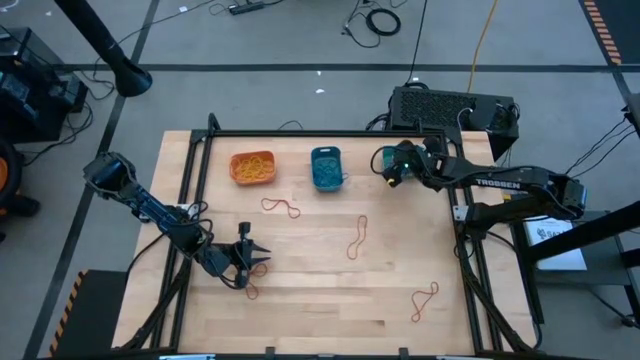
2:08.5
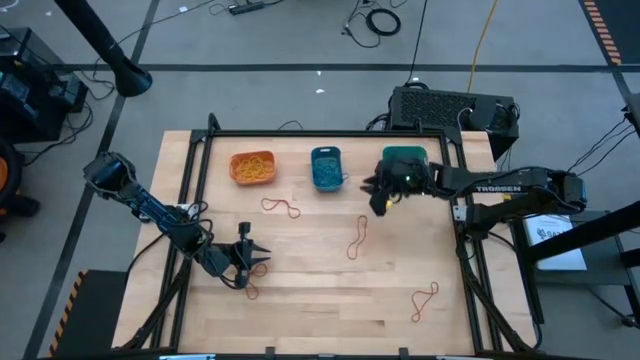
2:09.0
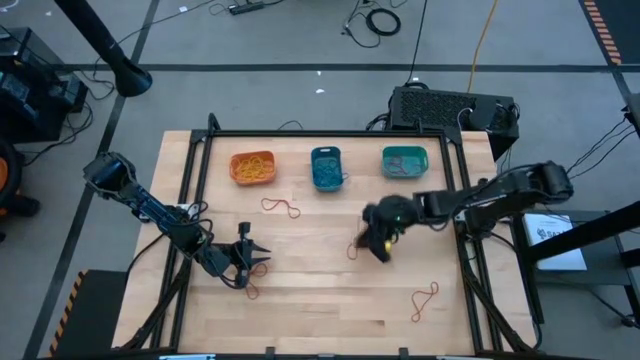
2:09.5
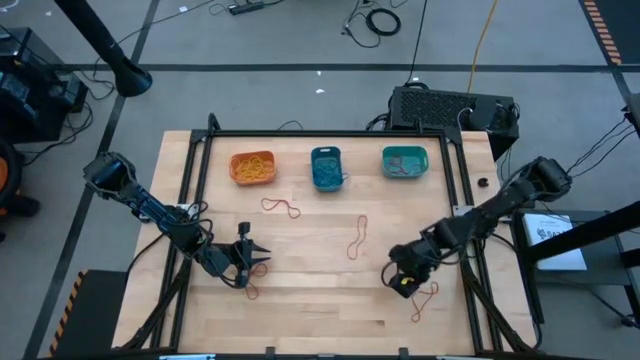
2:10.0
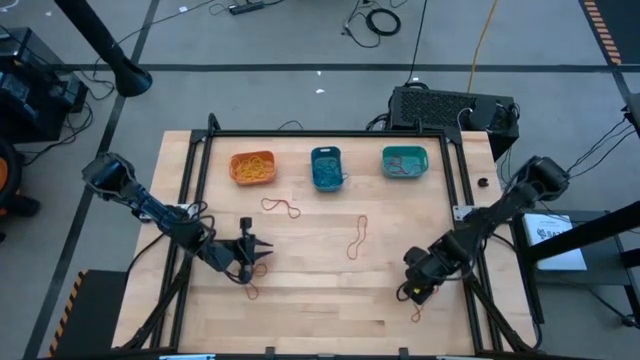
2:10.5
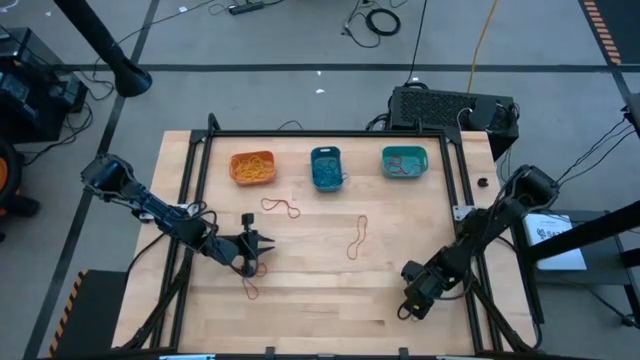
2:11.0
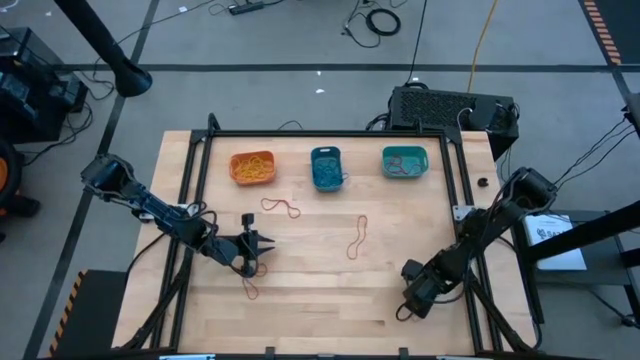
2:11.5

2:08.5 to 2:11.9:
Task: Sort rubber bands into baskets
Put the red rubber band into the green bin

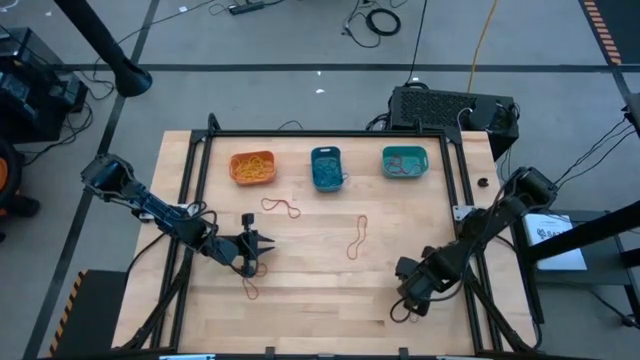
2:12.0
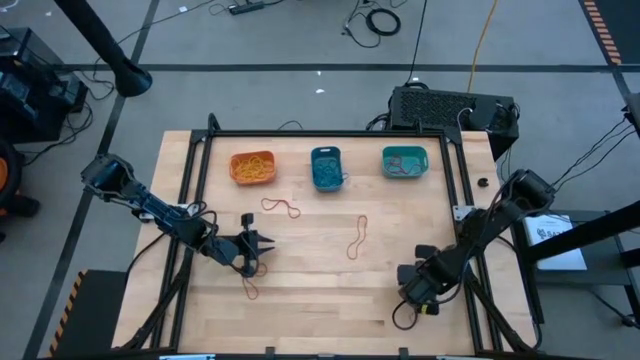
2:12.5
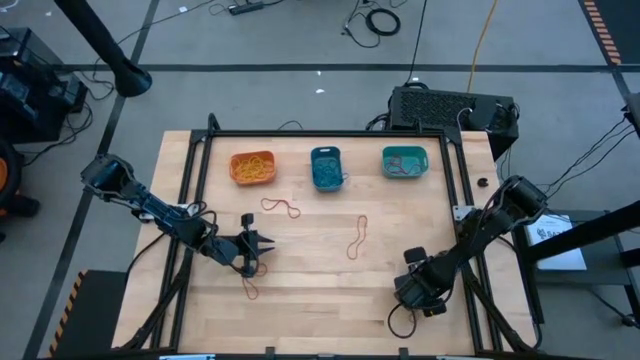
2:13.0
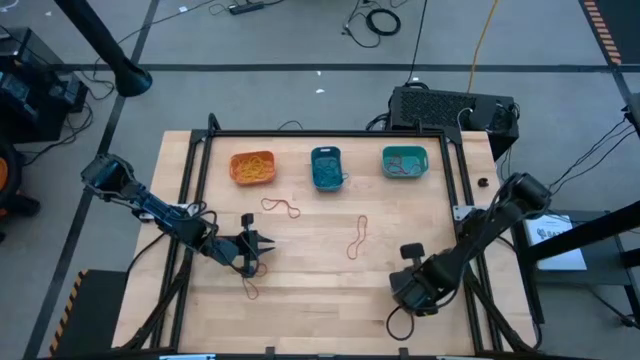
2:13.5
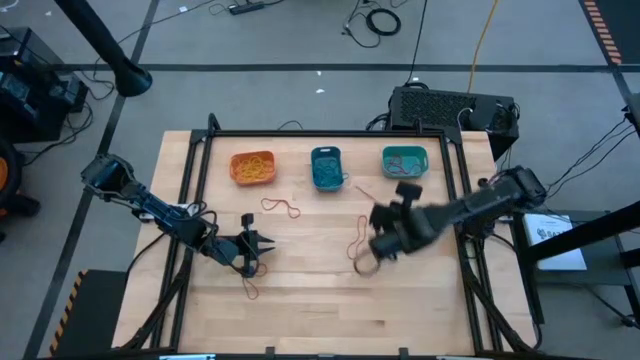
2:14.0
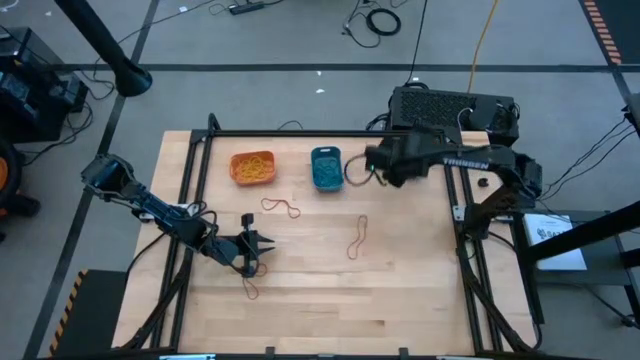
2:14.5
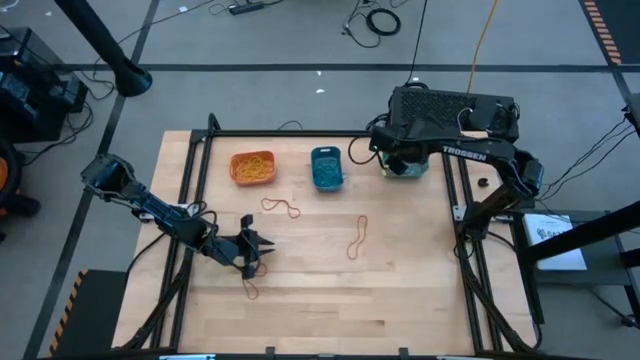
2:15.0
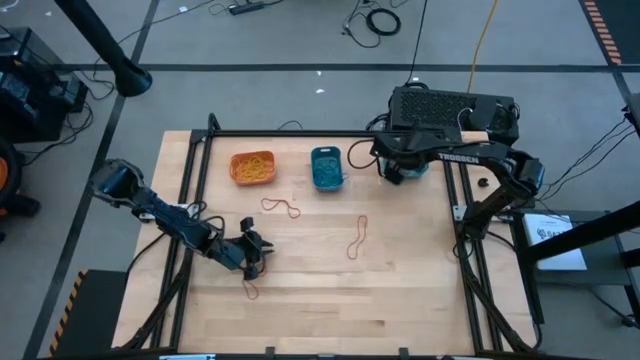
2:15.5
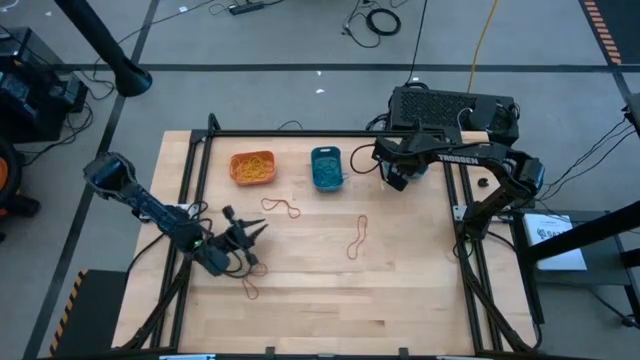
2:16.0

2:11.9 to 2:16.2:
Put the red rubber band into the green bin

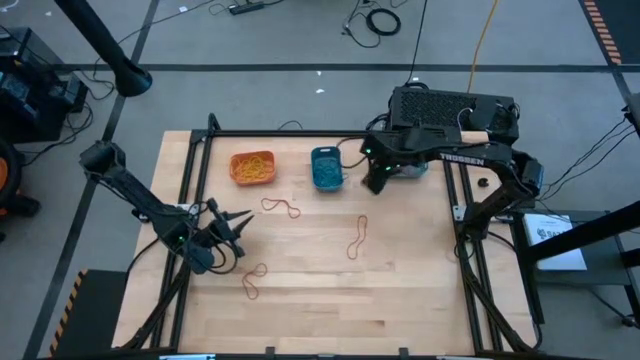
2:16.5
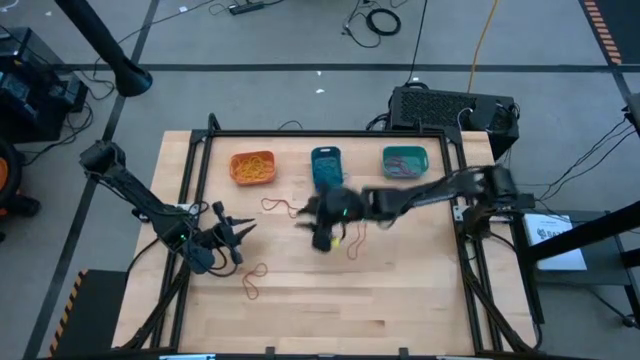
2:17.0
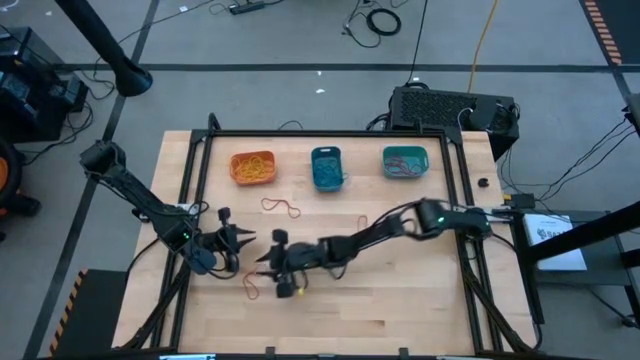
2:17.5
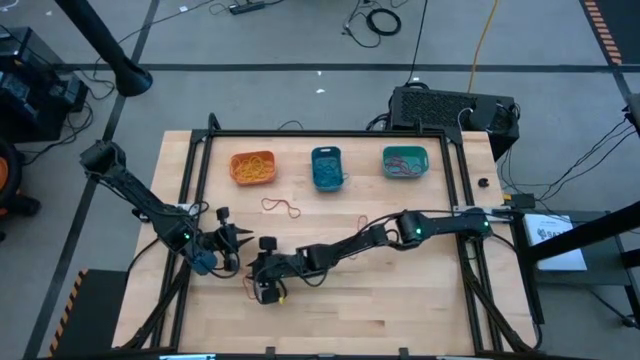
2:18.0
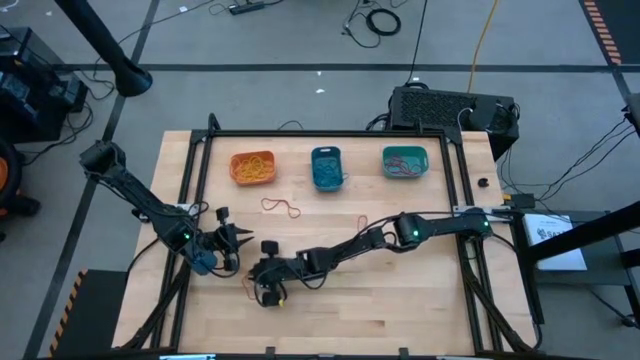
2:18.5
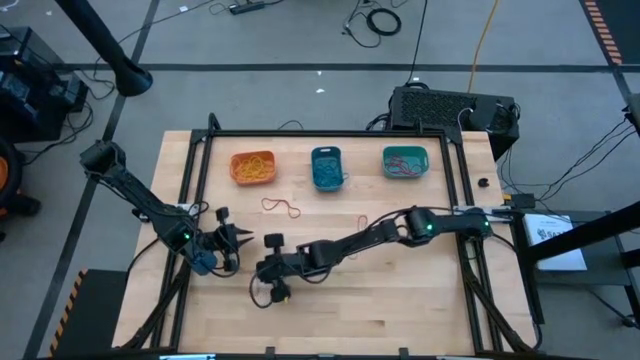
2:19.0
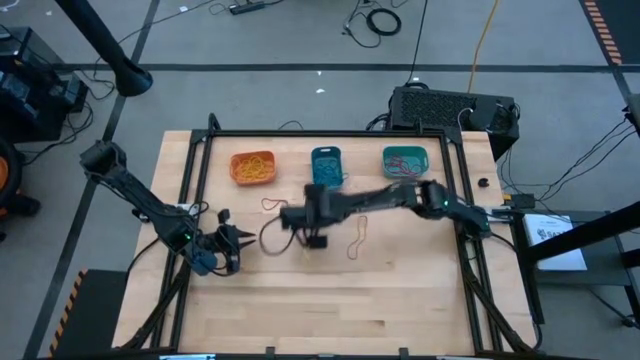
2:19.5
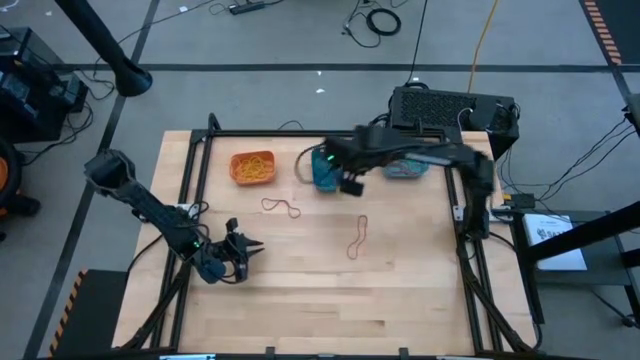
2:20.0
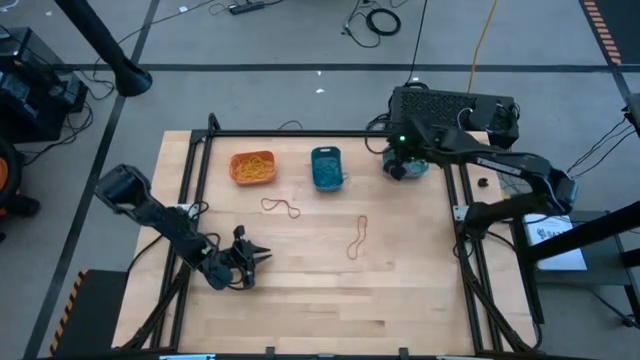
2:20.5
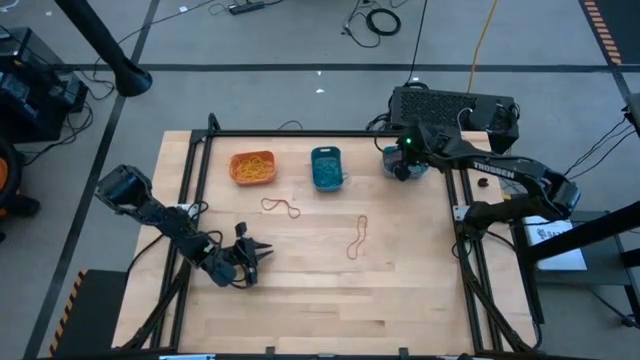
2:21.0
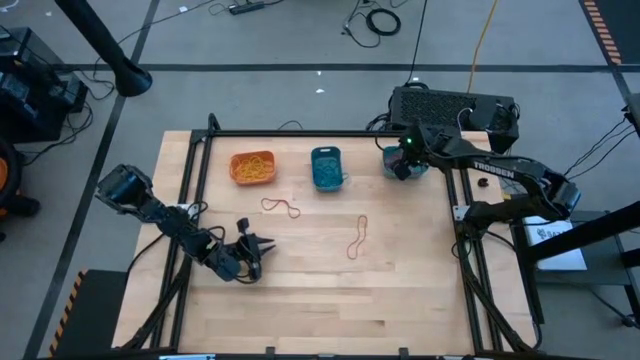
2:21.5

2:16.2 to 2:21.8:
Put the red rubber band into the green bin

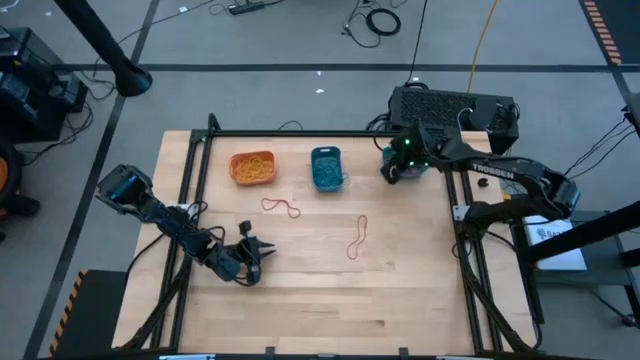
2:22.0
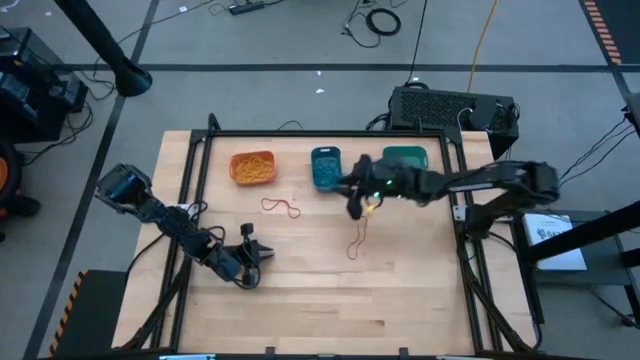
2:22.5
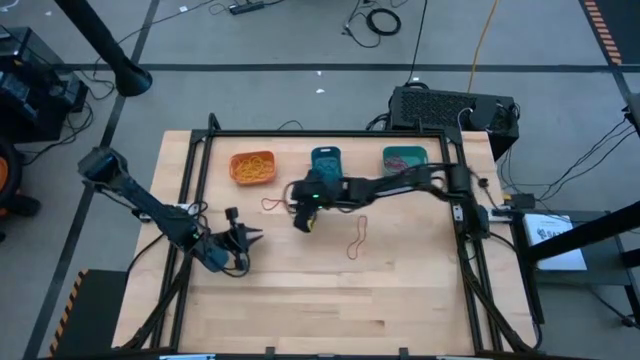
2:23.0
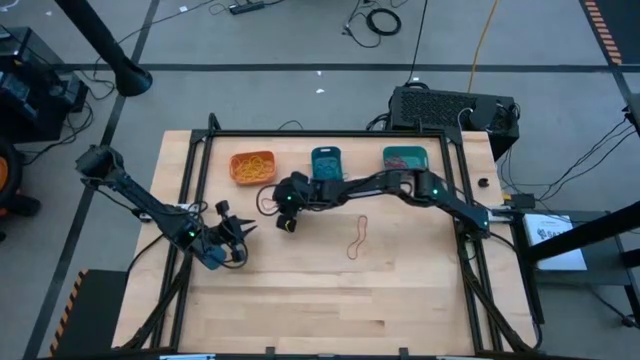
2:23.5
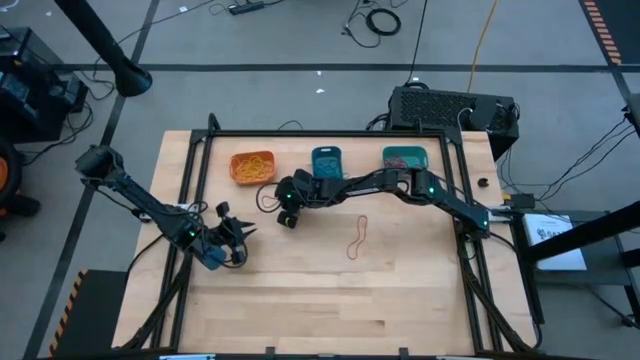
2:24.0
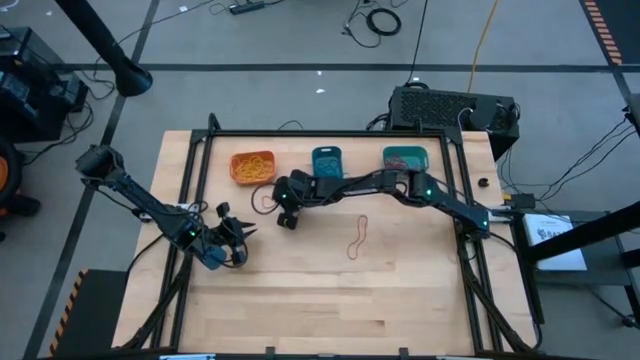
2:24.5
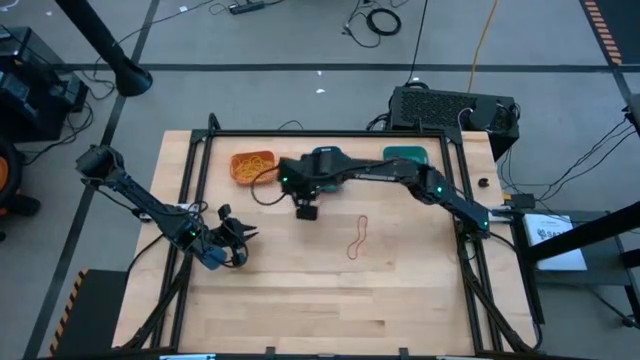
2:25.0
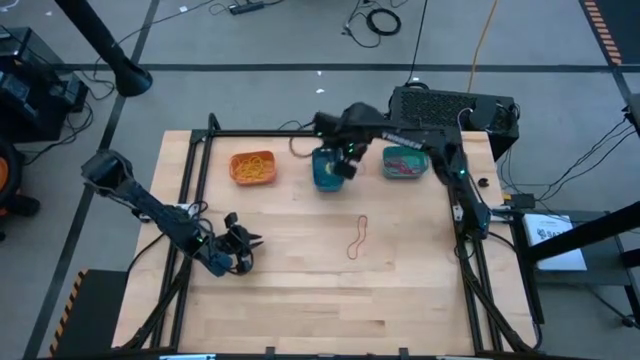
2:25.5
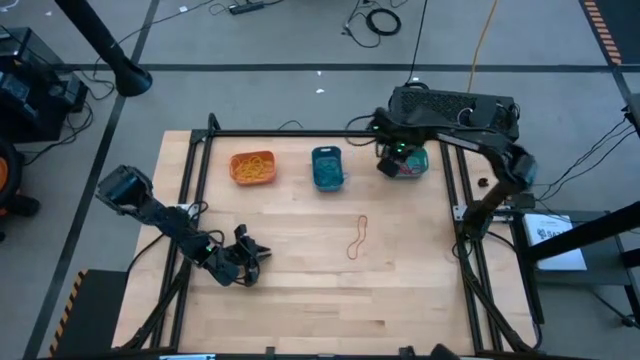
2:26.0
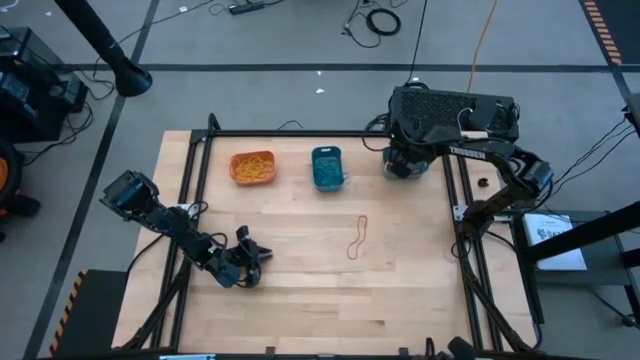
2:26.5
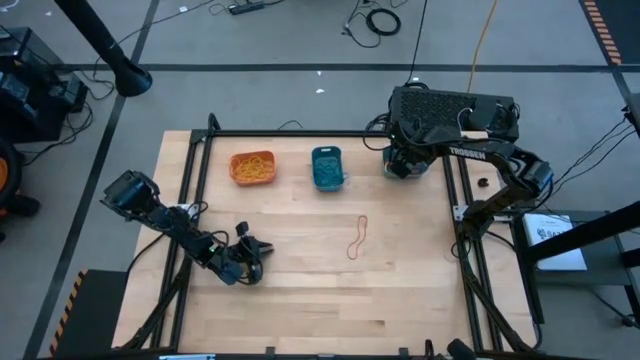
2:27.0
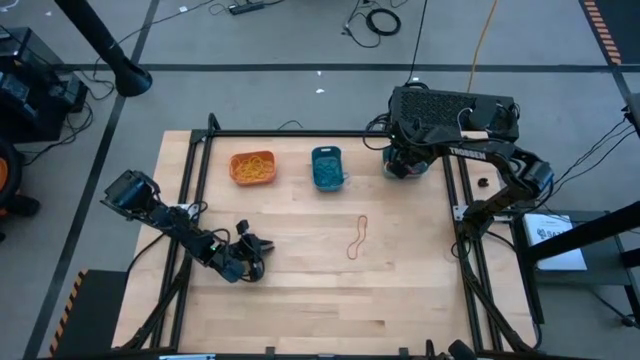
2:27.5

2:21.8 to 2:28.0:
Put the red rubber band into the green bin

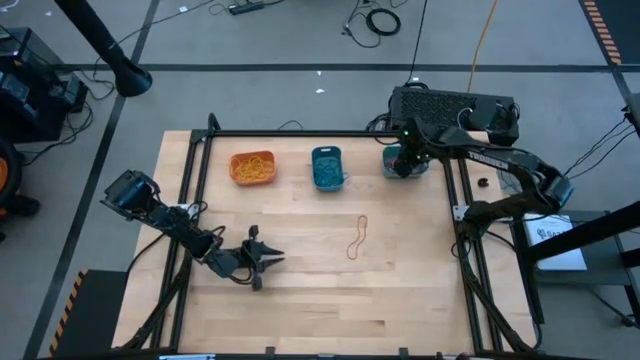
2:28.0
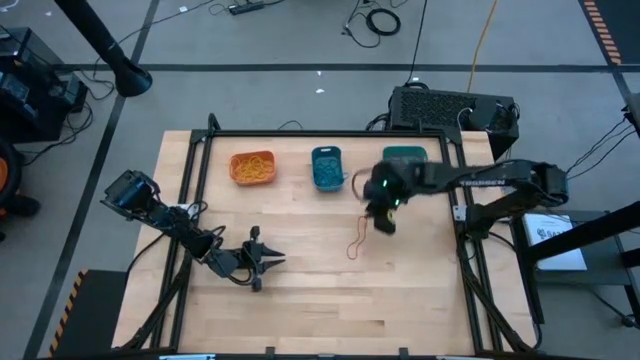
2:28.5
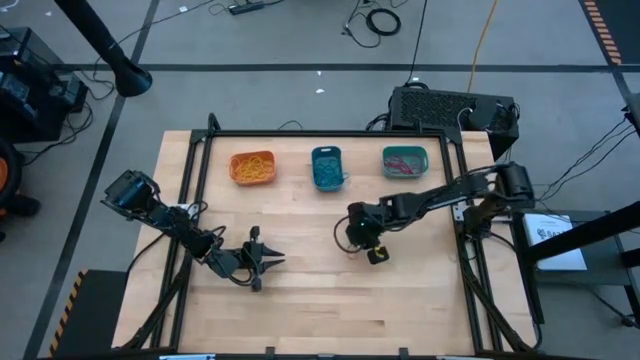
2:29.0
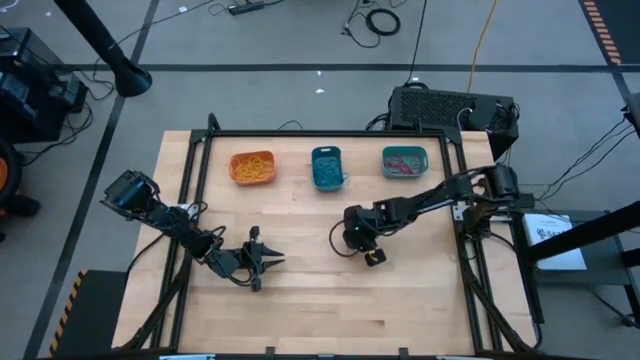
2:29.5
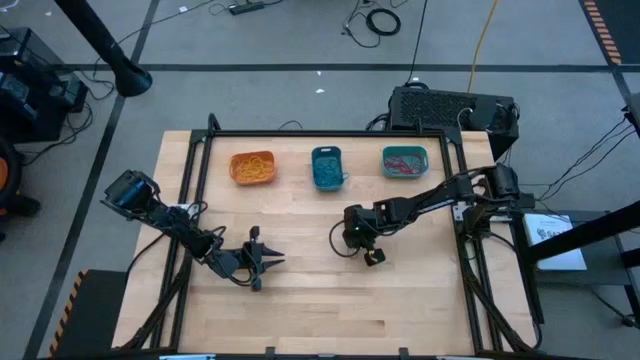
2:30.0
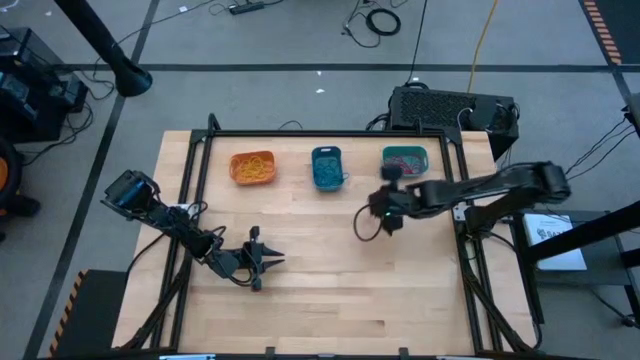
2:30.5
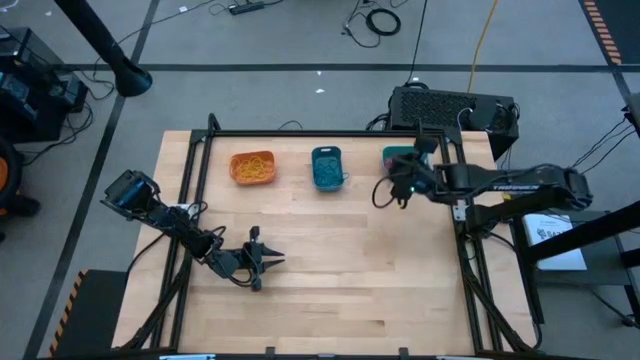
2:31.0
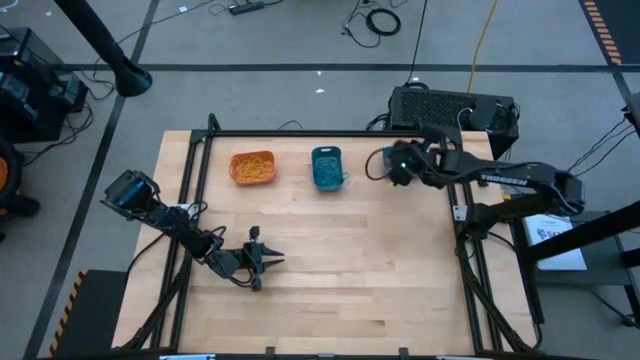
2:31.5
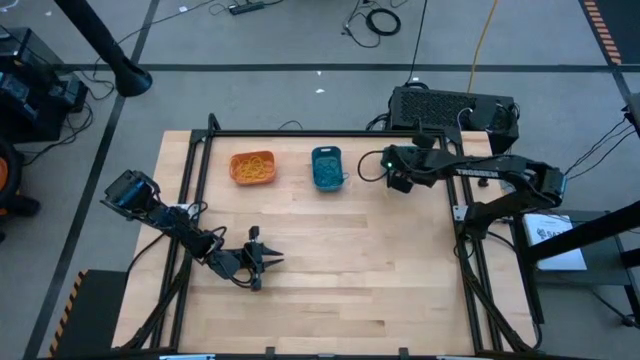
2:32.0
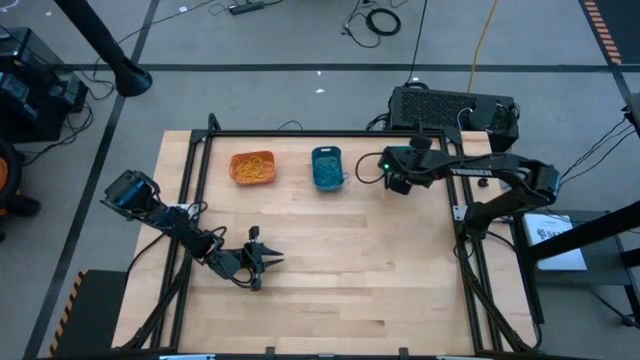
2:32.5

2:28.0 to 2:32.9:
Put the red rubber band into the green bin
